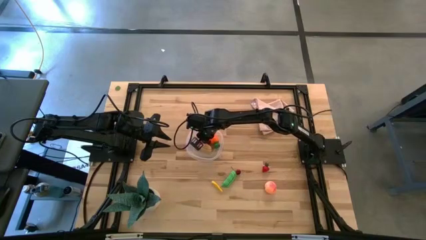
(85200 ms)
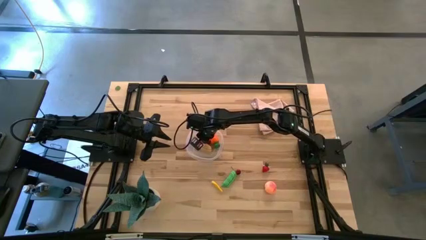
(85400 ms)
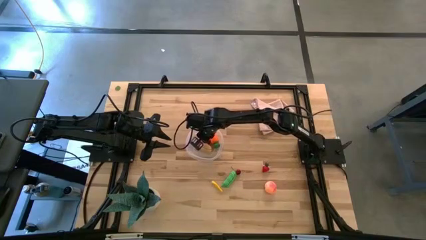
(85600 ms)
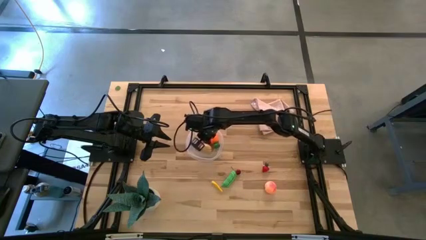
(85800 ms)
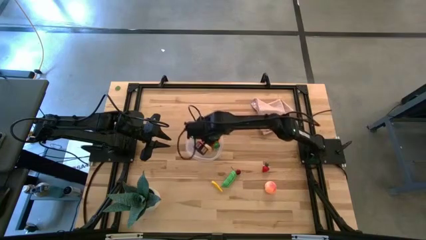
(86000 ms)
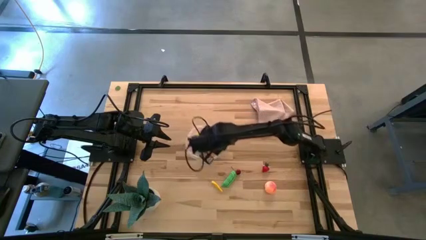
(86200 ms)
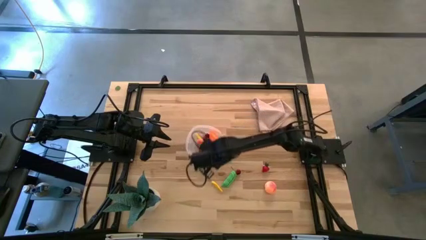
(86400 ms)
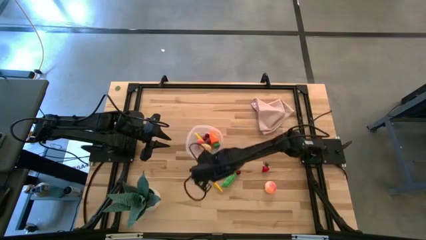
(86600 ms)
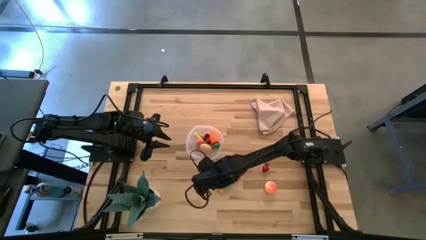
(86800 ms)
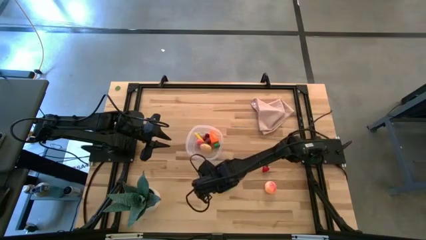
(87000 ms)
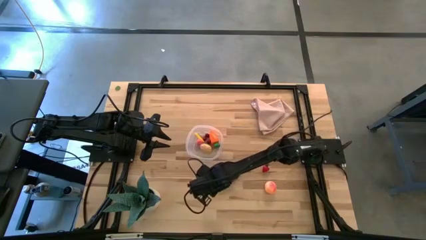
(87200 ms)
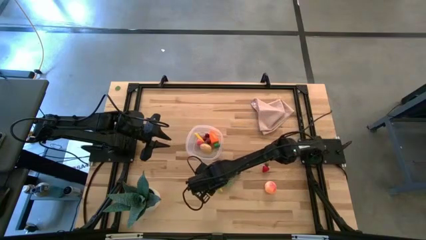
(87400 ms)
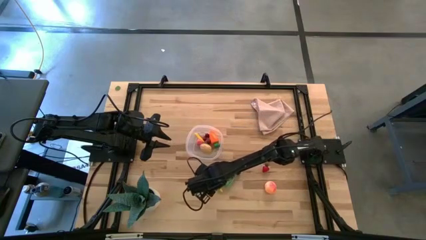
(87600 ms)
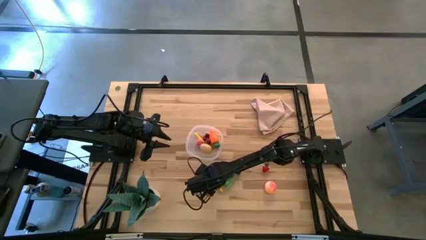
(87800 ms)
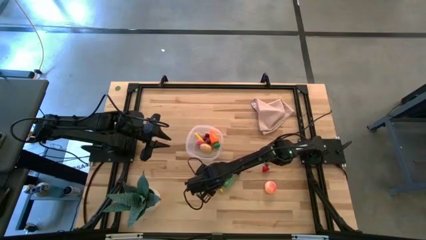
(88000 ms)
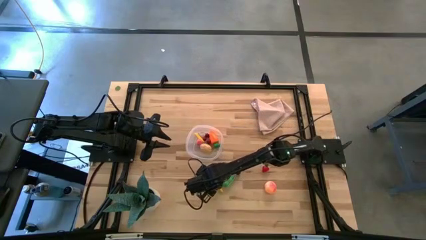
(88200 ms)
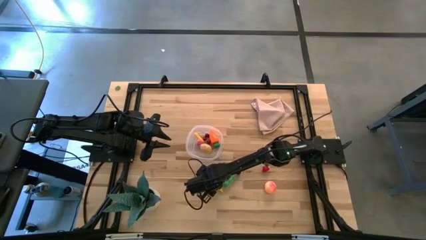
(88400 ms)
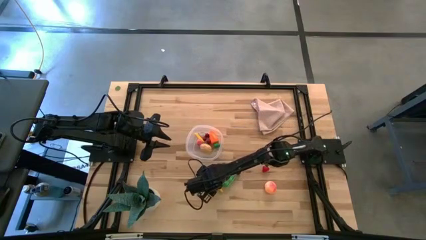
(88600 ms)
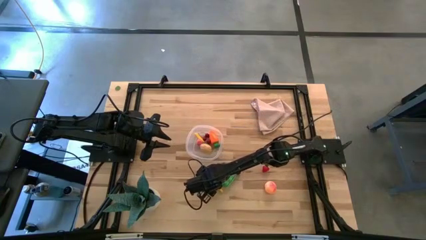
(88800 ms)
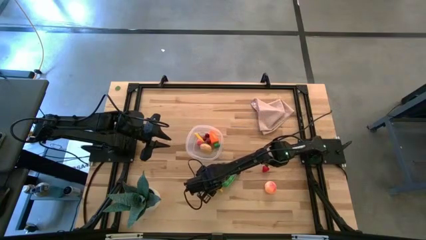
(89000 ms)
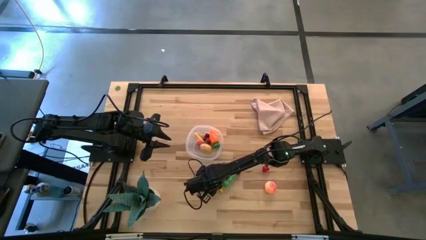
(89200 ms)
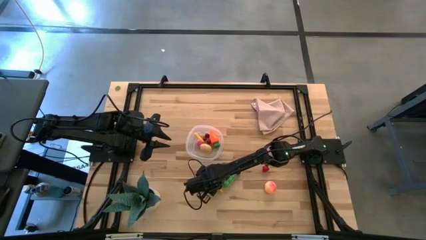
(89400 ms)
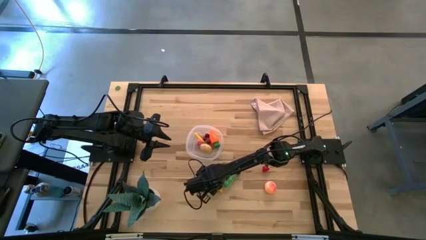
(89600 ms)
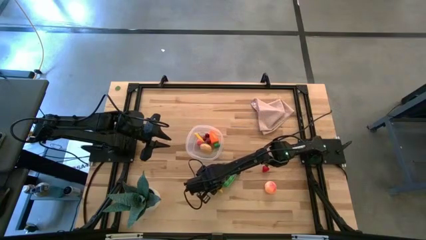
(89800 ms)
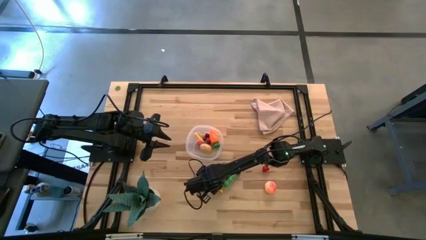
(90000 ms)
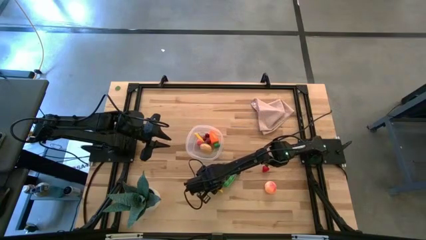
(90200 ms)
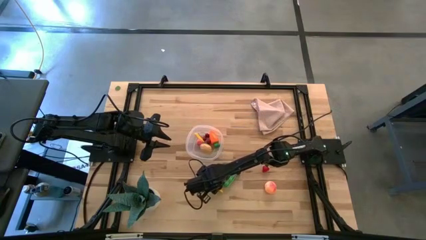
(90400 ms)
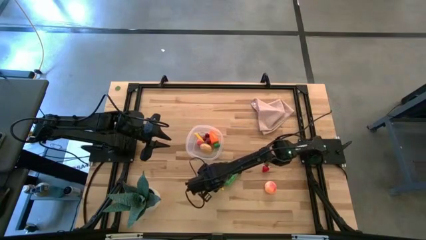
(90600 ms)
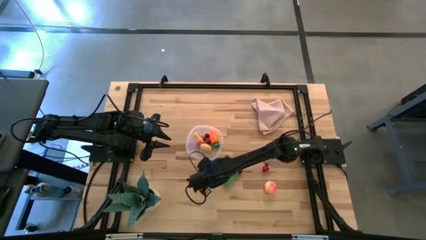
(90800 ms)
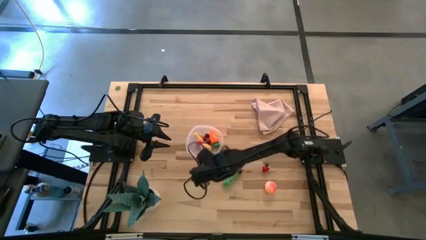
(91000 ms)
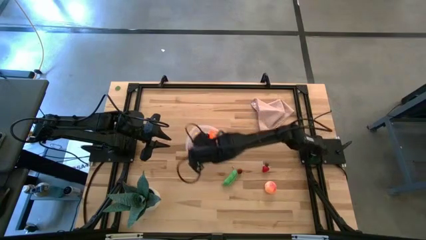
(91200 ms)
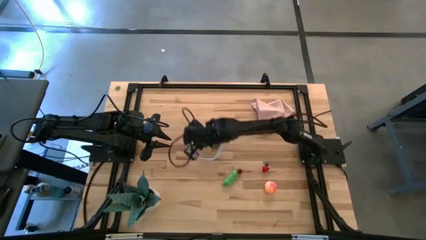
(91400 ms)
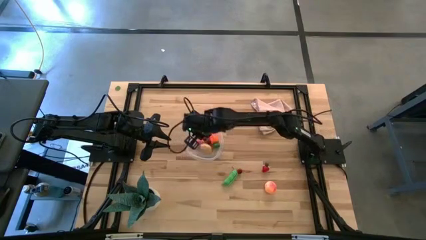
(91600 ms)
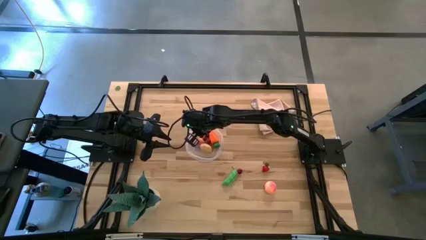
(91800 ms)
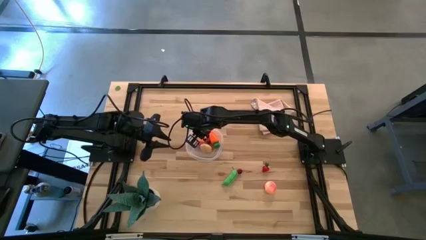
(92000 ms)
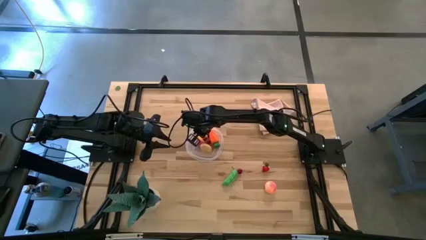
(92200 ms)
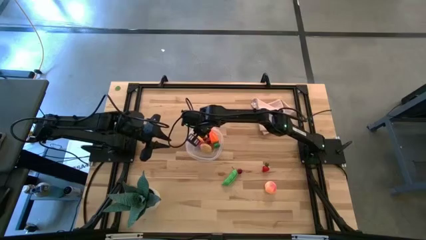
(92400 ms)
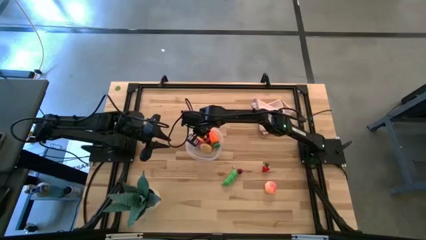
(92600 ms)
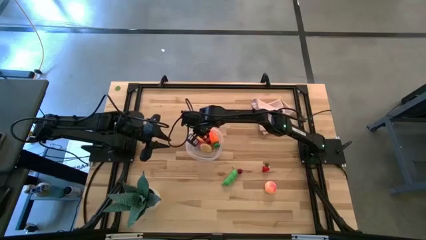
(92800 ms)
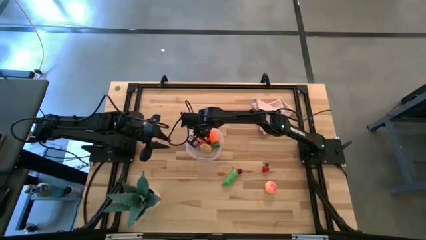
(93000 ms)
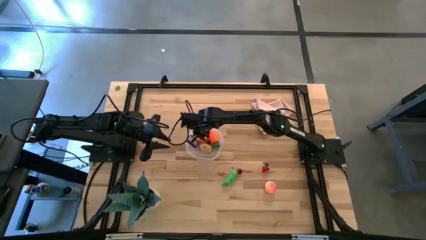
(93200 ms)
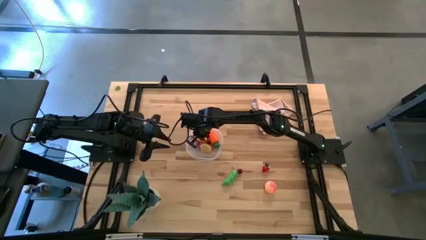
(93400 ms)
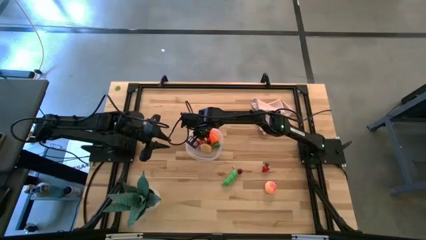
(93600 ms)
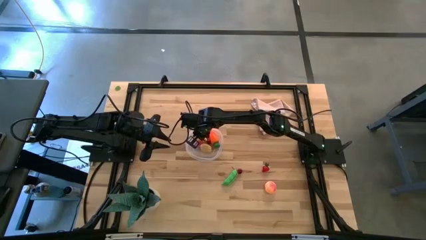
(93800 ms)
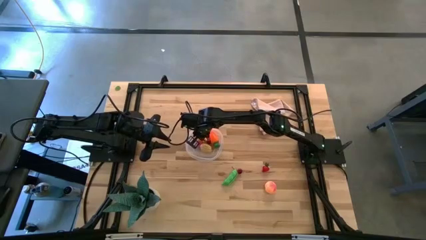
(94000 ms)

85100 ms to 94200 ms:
Task: Pick and placing Produce into tupperware
Put the corn into the transparent bin

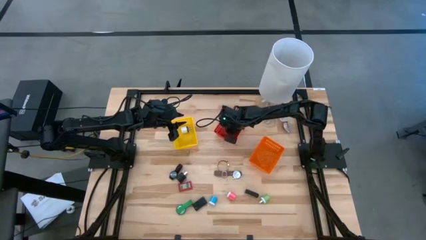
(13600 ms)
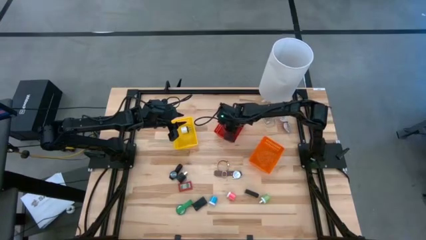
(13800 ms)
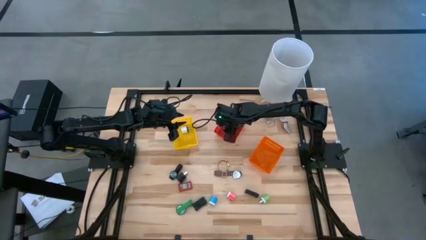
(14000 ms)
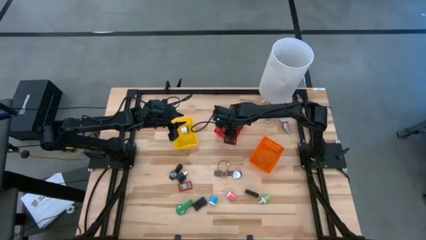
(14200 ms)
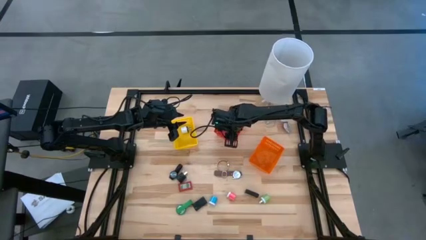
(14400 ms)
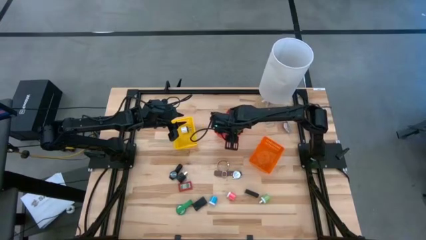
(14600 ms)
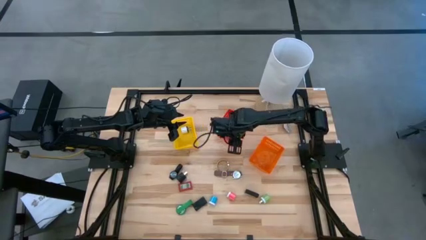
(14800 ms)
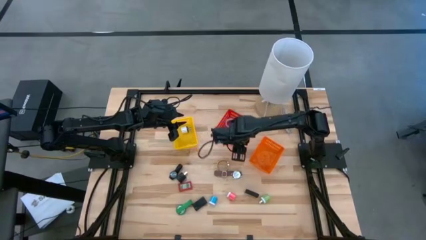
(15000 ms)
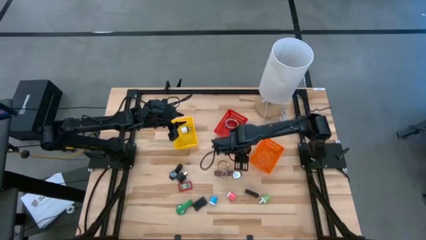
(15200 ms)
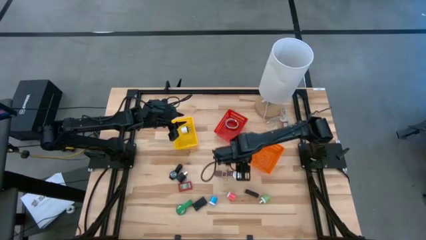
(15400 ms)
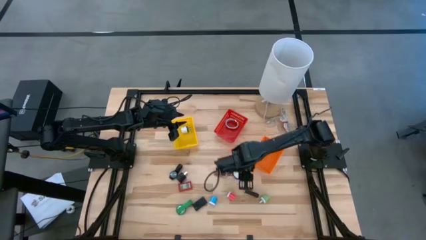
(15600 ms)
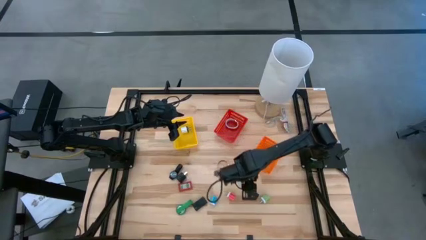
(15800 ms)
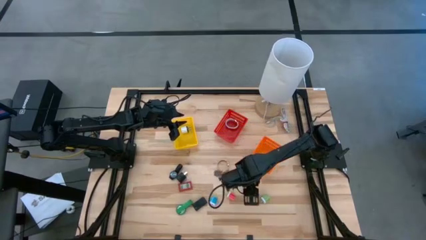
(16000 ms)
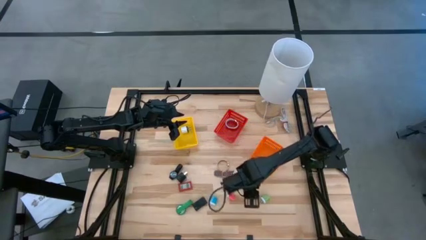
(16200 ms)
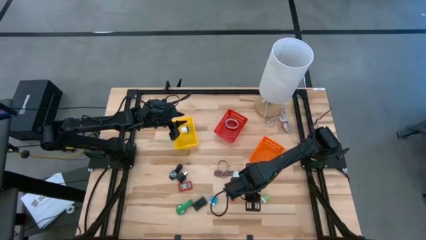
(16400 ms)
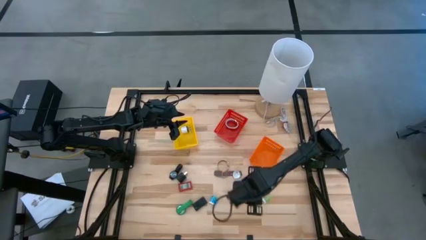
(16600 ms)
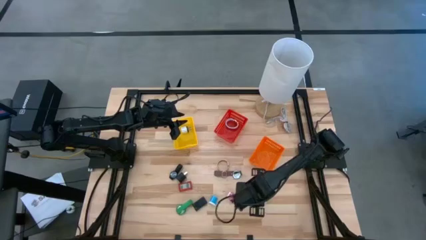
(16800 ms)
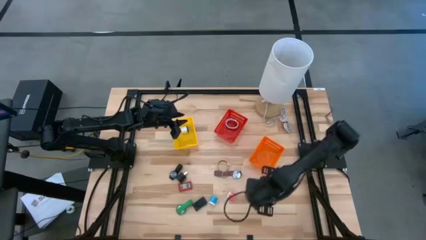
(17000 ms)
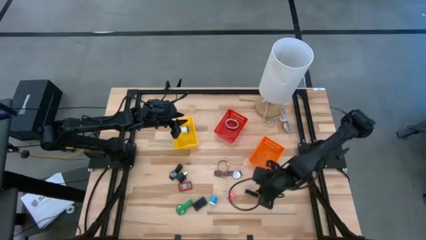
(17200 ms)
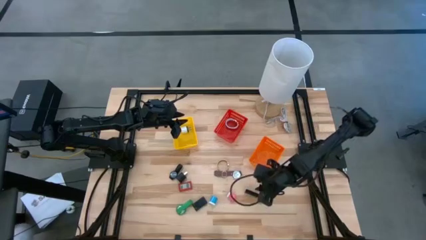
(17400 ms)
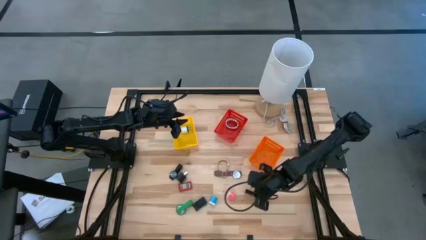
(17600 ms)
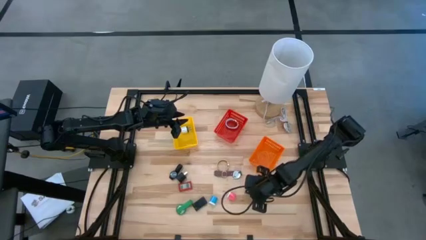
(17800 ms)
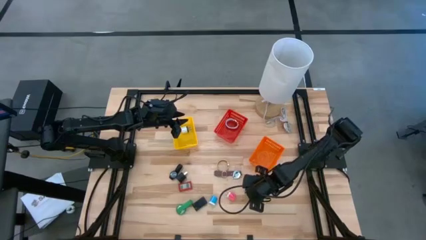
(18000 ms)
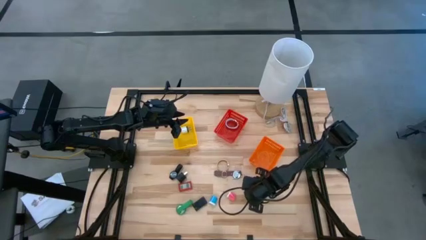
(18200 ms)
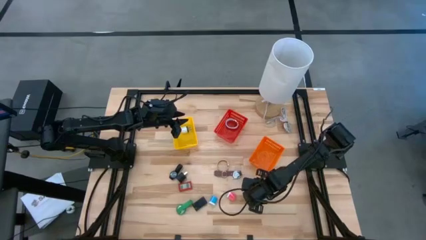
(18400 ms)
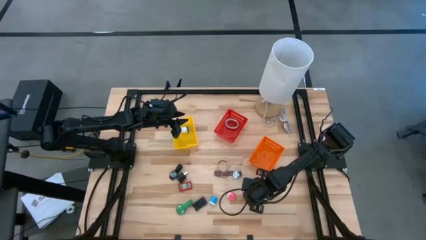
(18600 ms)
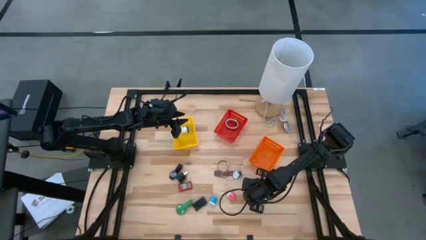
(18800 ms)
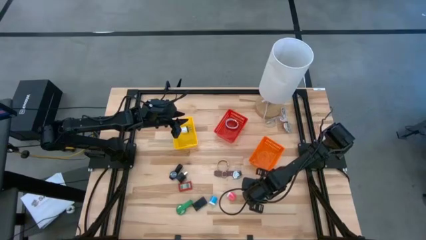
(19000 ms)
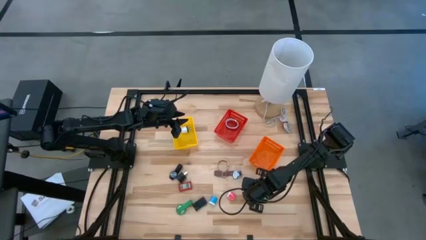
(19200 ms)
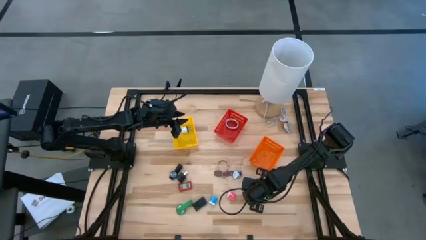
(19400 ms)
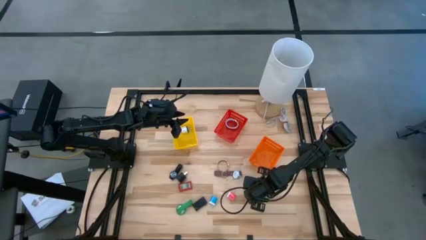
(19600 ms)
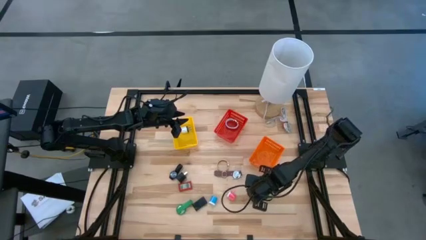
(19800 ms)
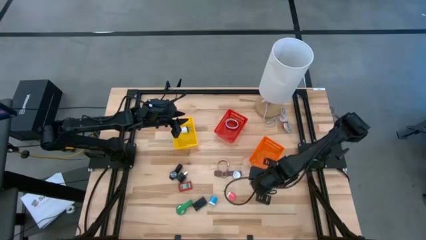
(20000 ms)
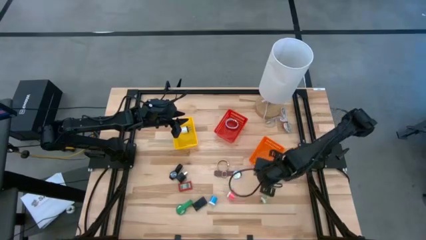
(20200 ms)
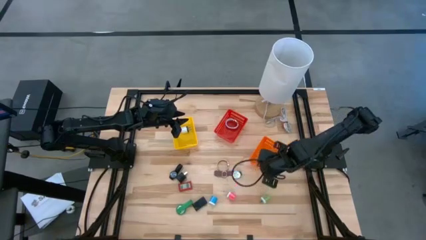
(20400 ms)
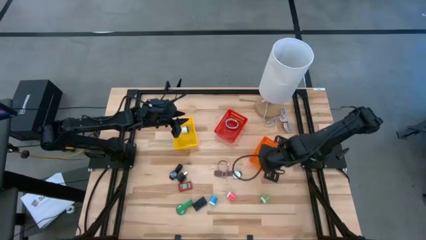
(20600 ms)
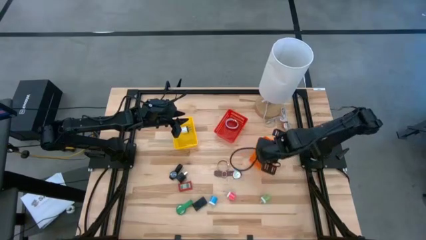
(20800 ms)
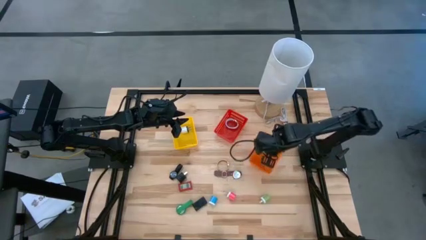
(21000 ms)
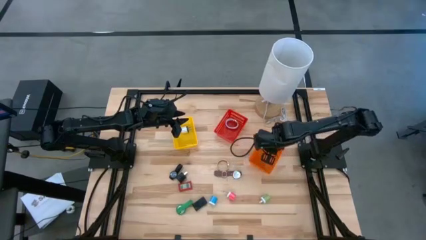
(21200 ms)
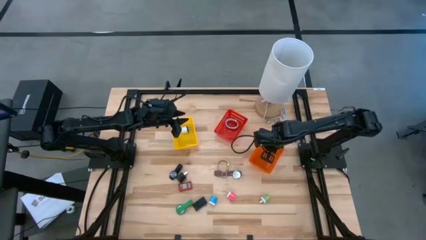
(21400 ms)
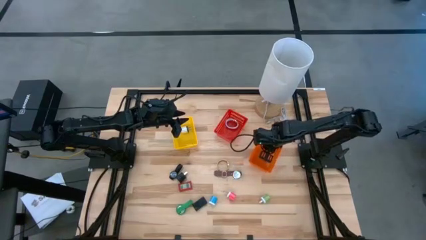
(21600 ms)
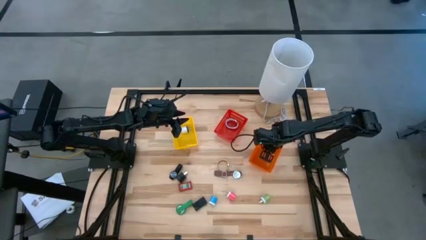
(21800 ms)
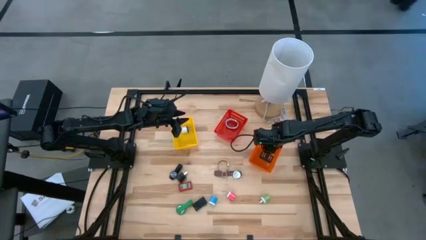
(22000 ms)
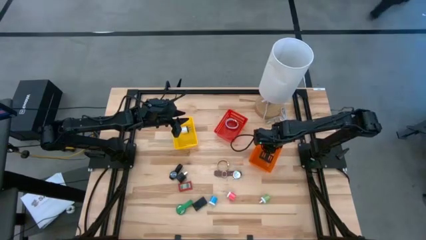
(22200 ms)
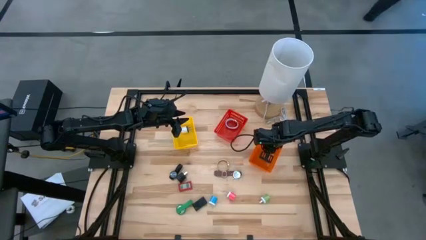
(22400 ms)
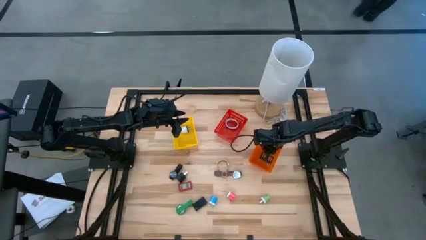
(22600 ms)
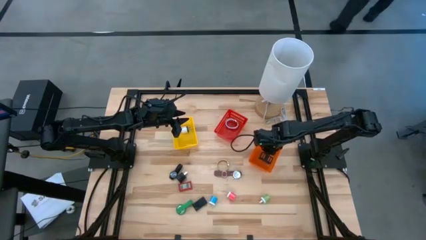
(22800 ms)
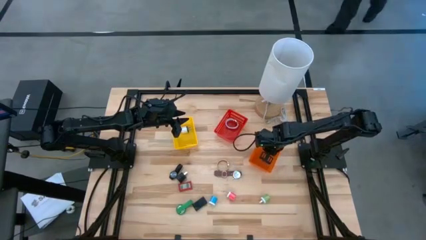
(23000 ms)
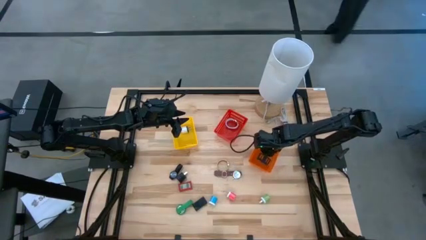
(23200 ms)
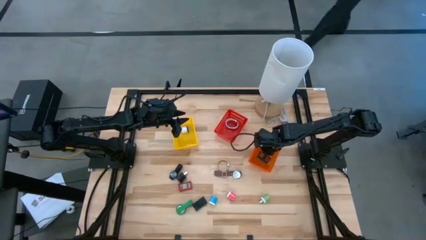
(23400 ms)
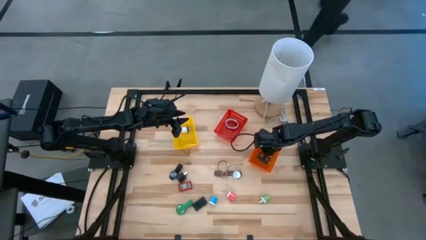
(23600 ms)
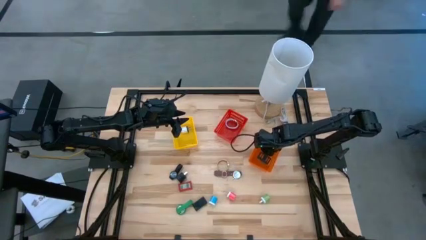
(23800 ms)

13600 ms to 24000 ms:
Task: Pick & Place Office items
Put the right black digital clock into the orange basket
